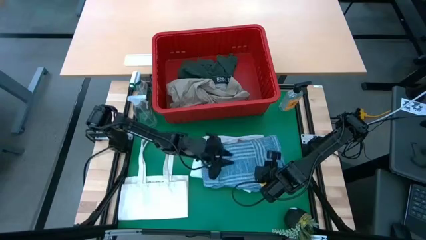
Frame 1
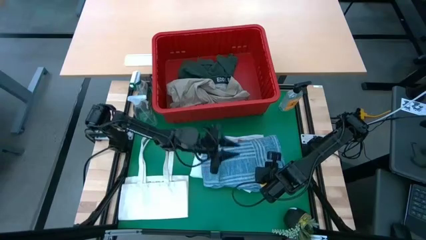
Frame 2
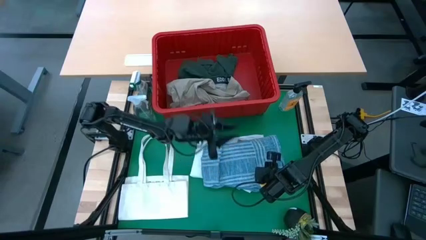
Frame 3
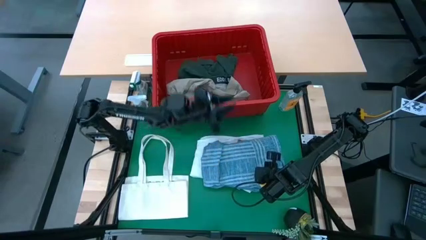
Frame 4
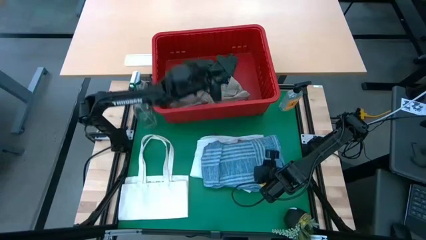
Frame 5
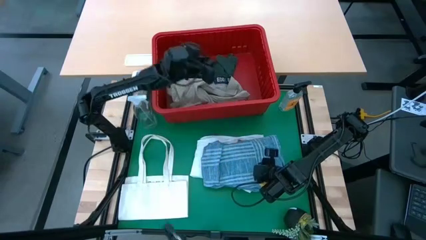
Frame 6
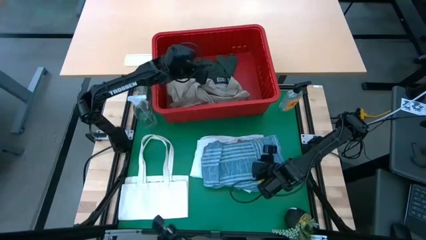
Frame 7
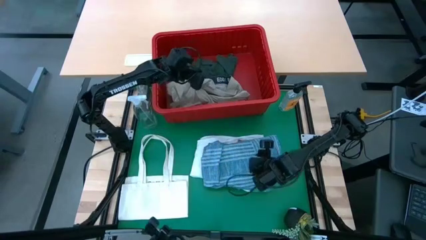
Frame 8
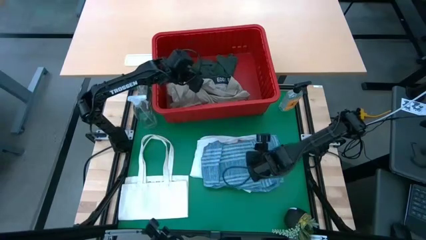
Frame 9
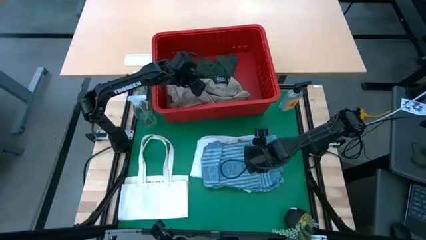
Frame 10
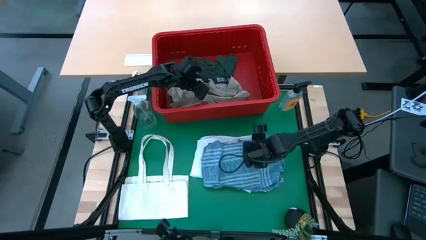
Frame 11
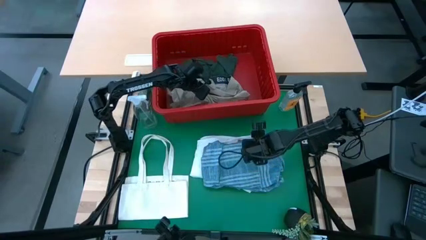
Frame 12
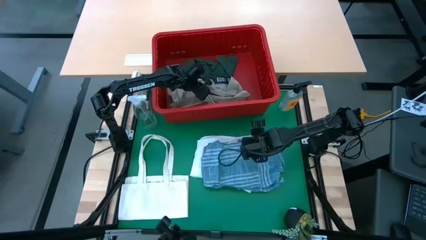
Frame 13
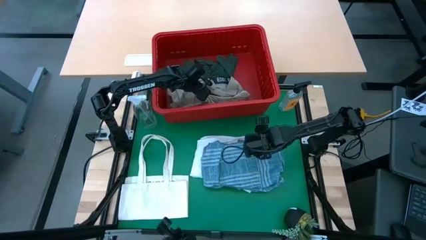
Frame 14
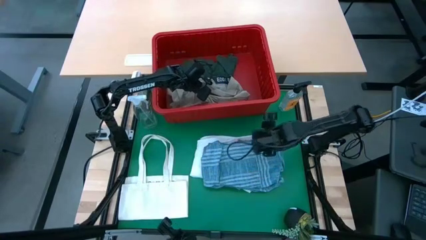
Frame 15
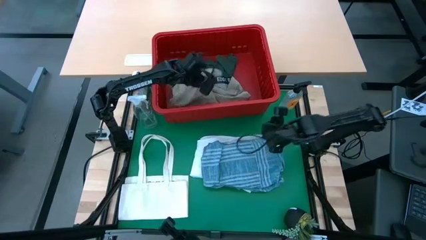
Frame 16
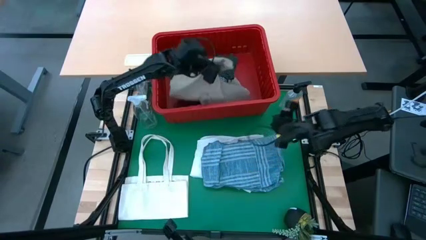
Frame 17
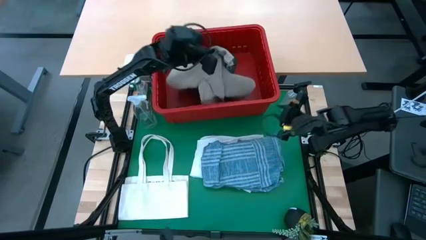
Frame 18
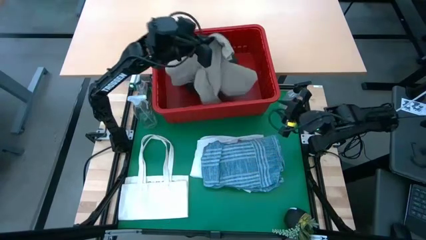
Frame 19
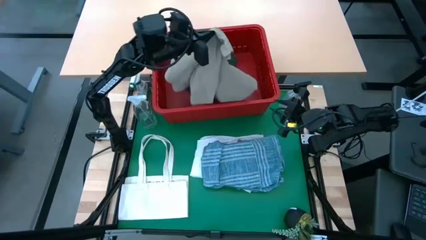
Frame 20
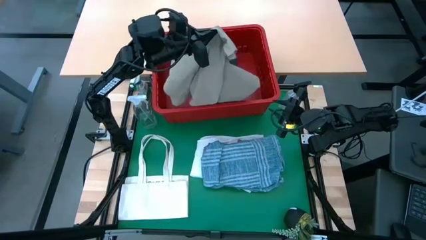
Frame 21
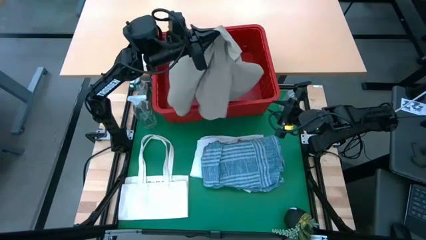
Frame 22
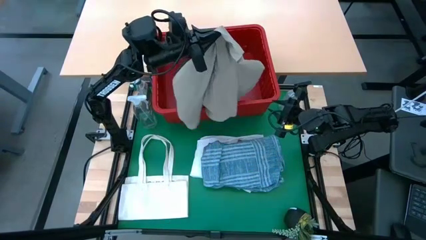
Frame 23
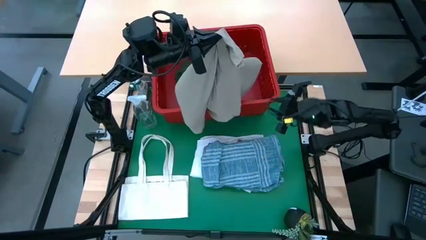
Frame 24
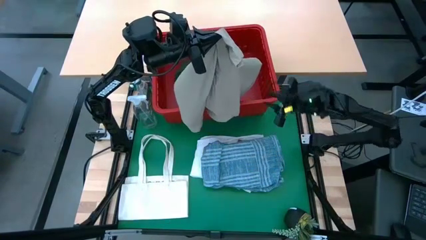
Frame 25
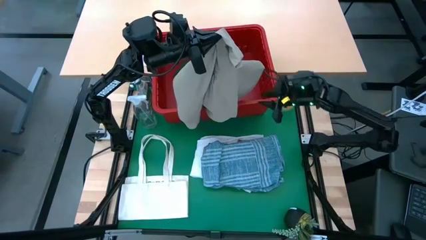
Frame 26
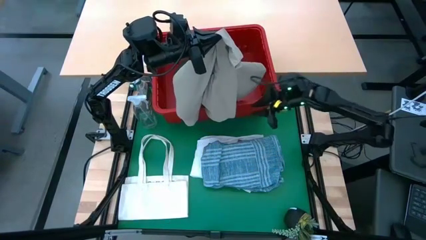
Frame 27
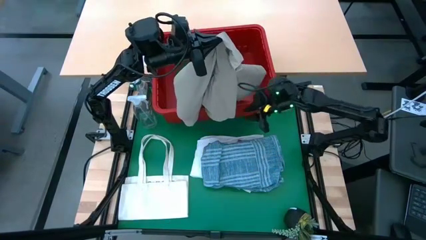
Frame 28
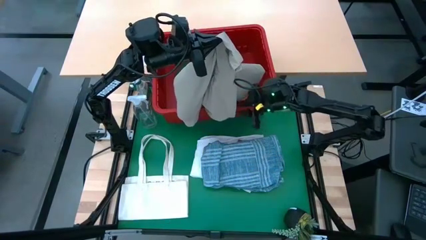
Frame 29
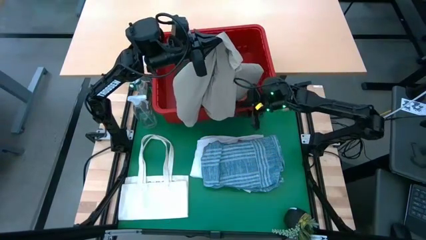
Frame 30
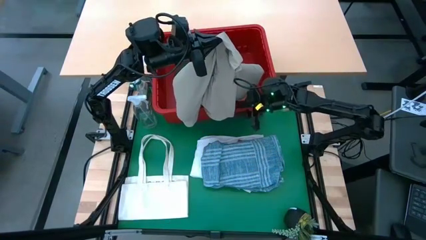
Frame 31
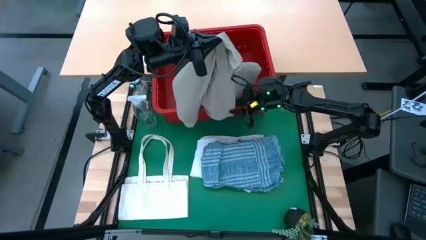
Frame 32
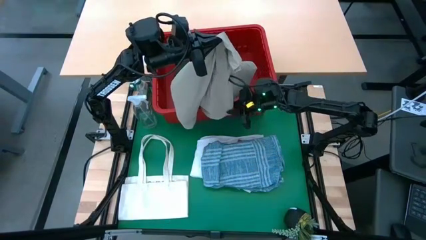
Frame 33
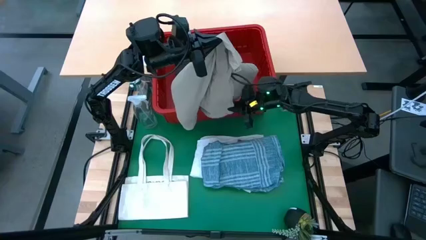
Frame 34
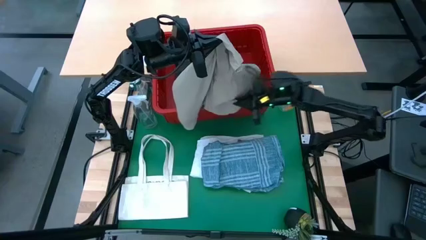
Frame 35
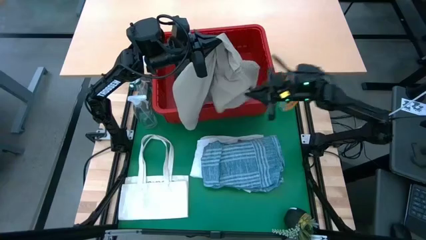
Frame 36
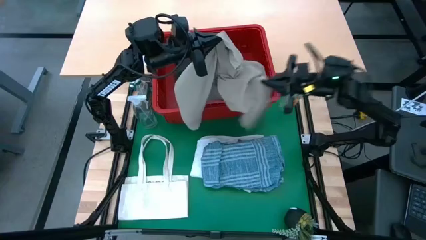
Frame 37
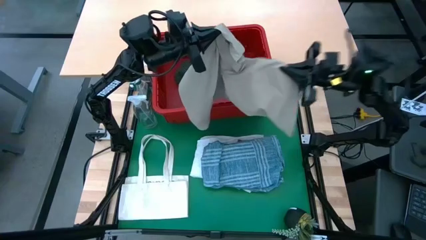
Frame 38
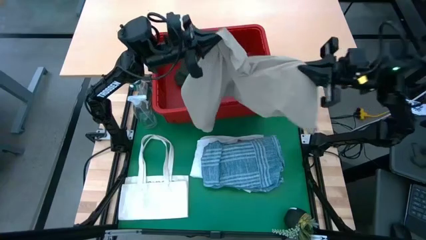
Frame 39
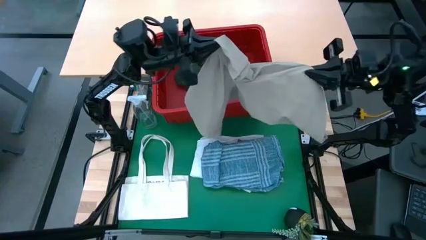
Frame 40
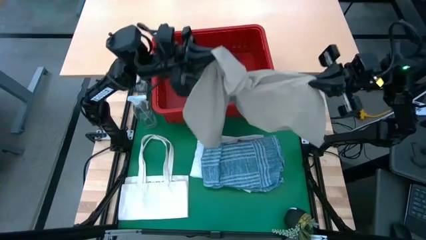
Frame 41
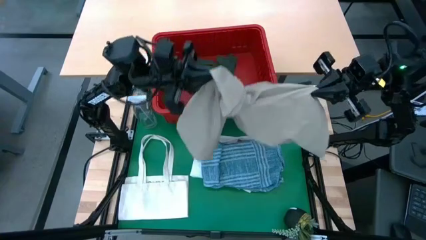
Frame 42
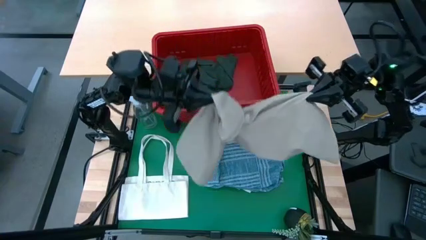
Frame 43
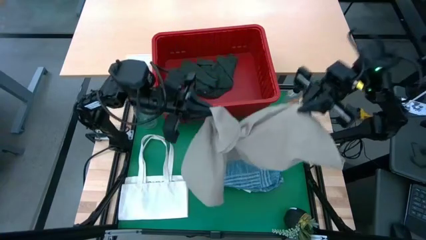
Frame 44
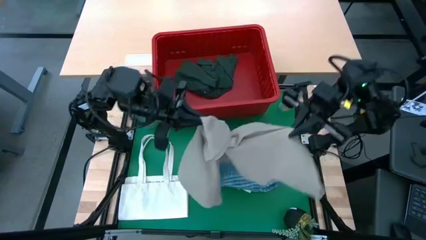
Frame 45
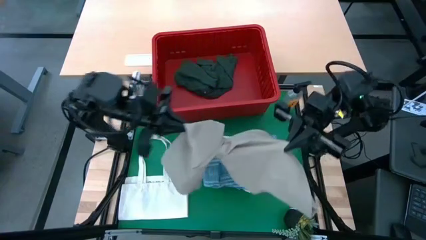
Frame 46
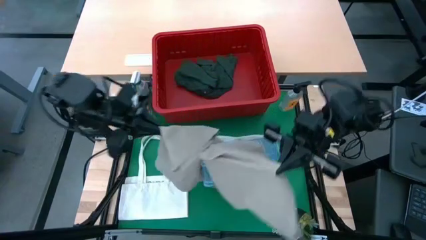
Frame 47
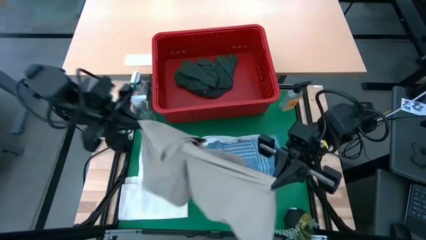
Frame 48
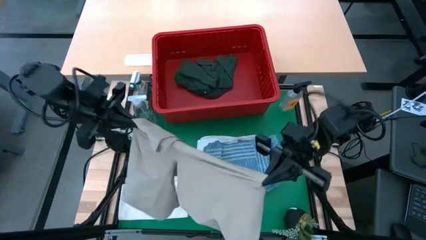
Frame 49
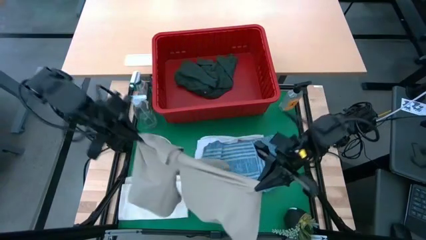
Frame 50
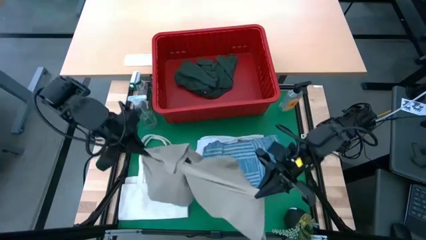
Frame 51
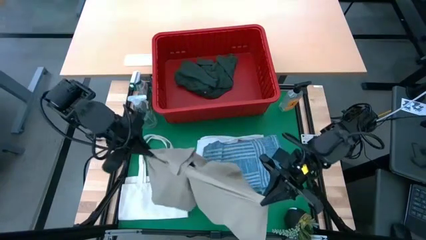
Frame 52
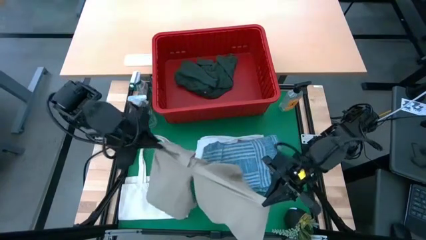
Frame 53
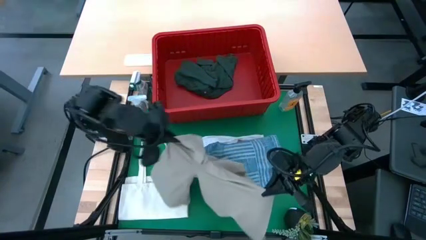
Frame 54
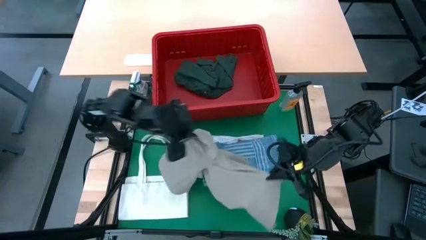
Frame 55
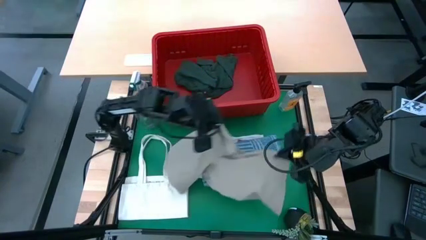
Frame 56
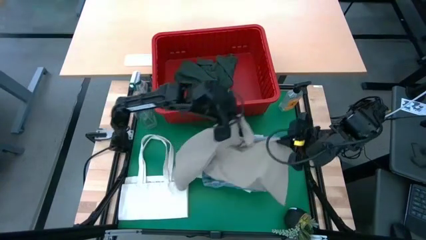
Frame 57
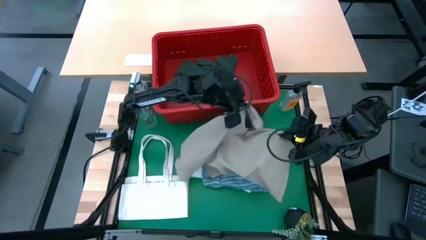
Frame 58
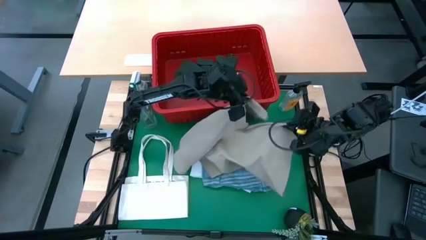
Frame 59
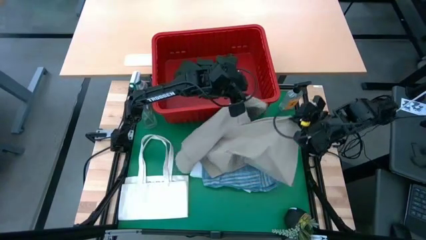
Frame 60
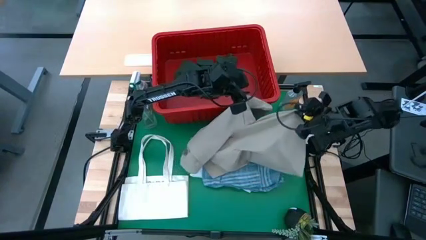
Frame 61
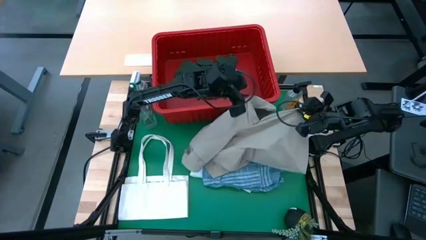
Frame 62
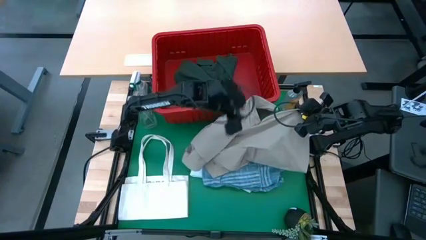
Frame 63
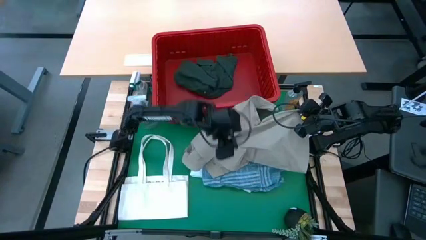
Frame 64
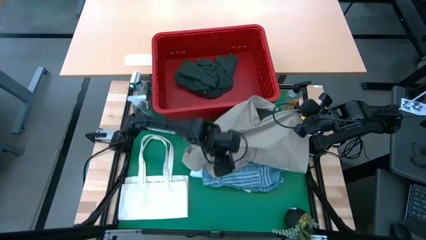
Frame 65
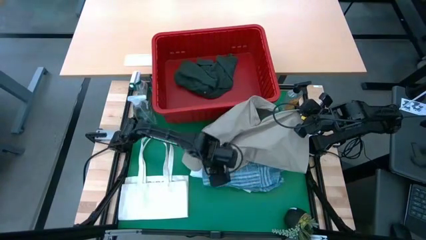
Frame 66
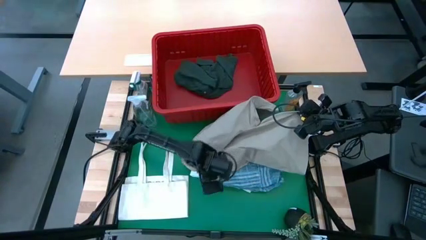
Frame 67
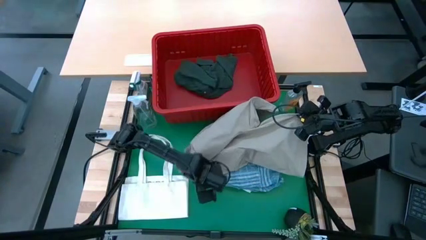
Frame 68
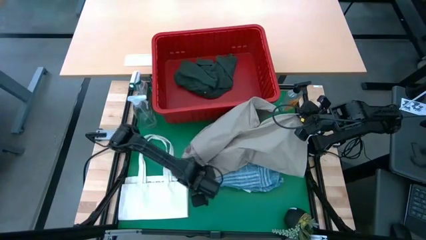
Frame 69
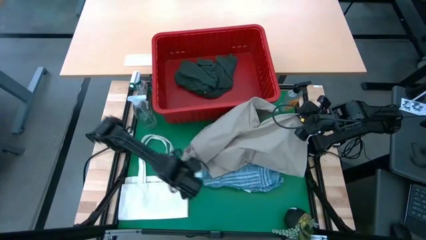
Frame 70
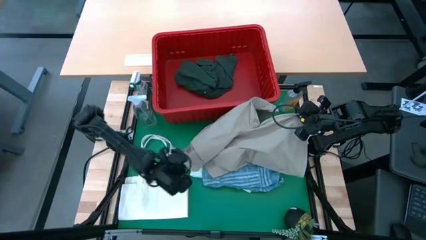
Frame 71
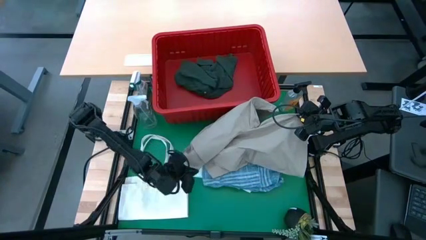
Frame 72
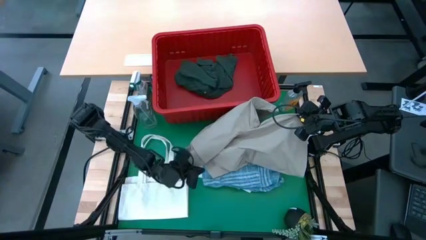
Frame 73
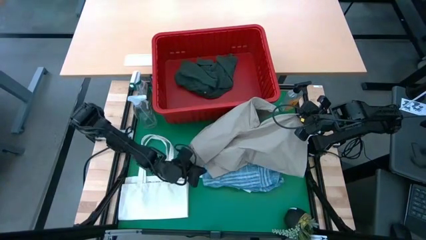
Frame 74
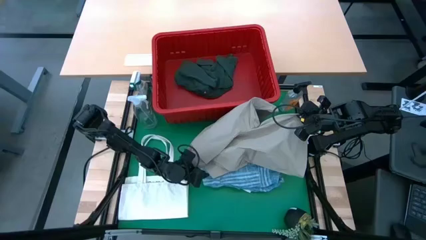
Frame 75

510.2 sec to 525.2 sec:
Task: Fold Laundry from Bin
Fold the light brown shorts
